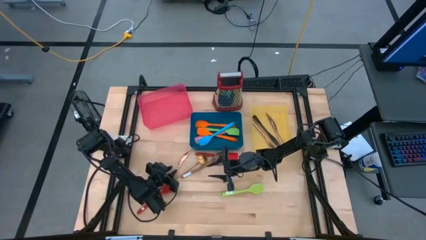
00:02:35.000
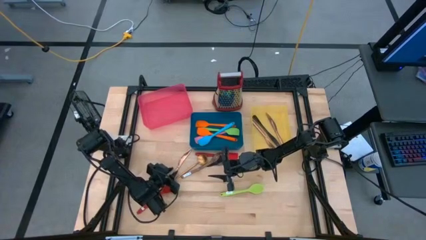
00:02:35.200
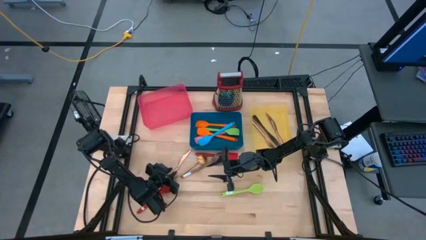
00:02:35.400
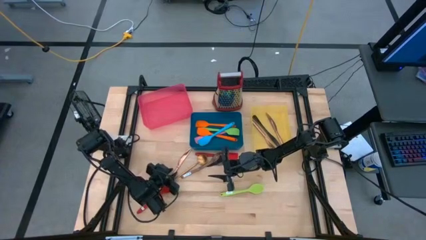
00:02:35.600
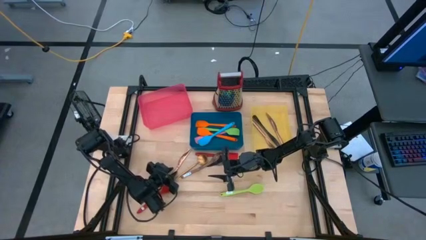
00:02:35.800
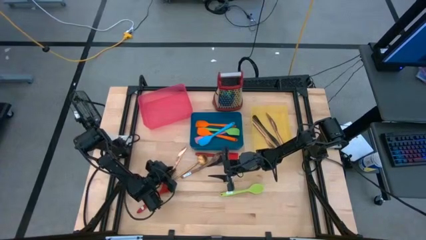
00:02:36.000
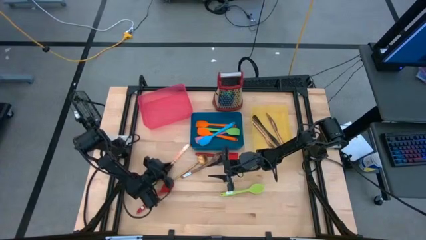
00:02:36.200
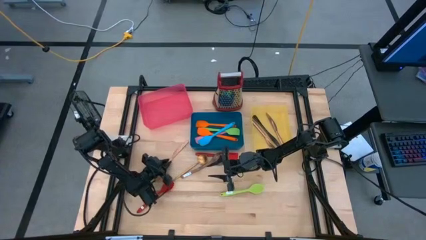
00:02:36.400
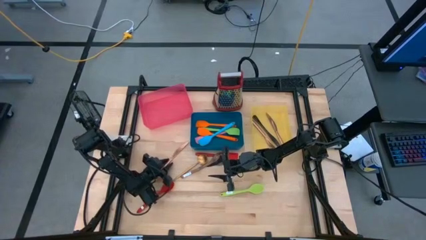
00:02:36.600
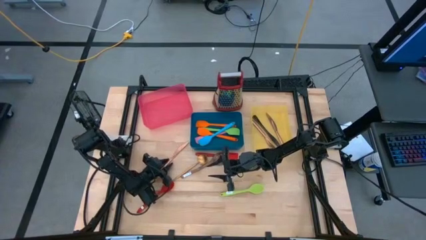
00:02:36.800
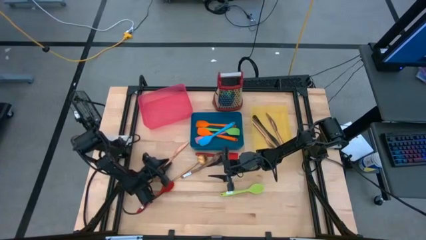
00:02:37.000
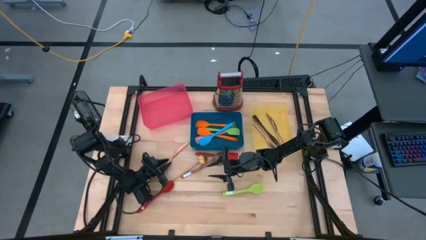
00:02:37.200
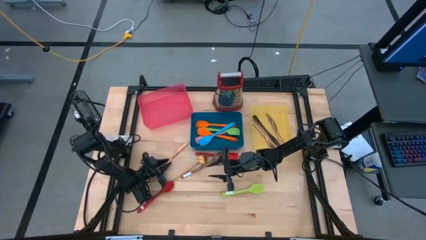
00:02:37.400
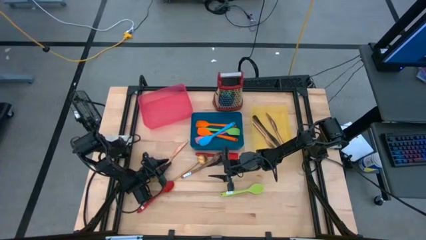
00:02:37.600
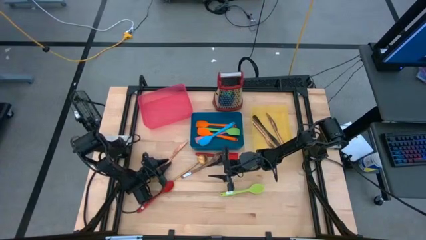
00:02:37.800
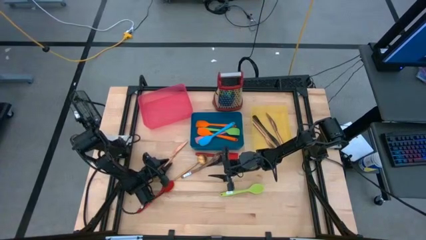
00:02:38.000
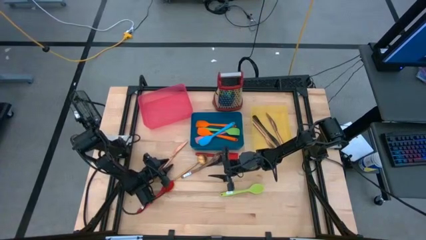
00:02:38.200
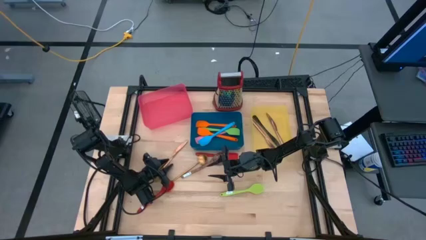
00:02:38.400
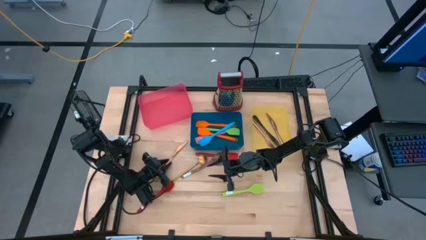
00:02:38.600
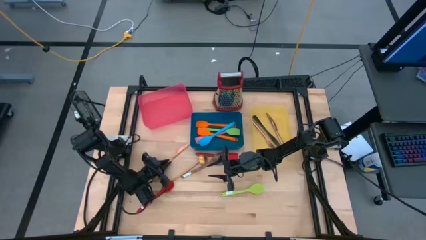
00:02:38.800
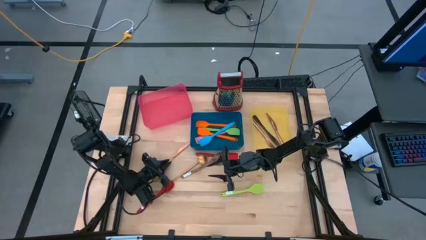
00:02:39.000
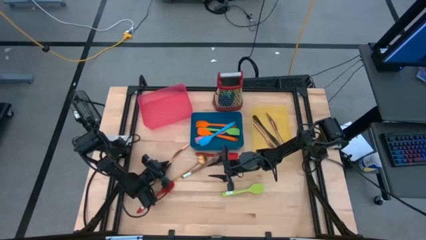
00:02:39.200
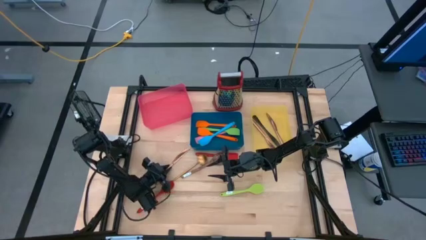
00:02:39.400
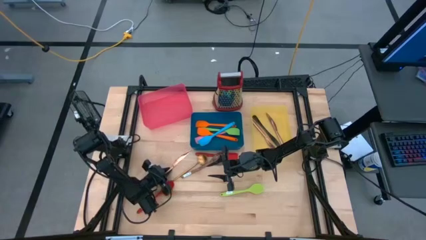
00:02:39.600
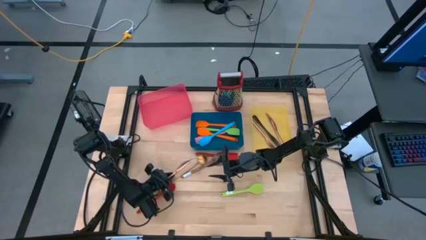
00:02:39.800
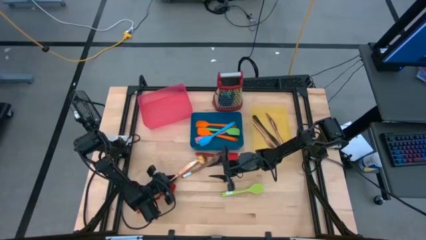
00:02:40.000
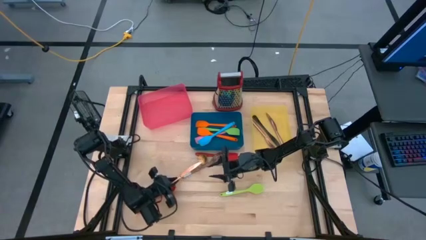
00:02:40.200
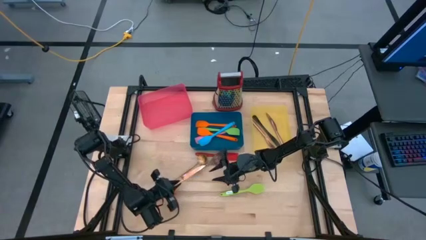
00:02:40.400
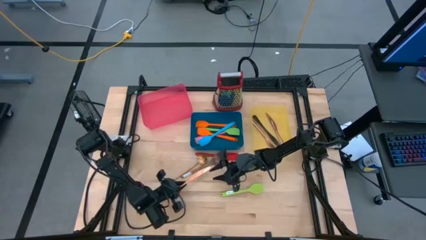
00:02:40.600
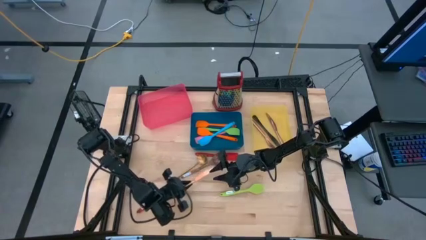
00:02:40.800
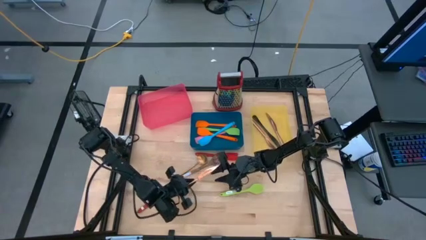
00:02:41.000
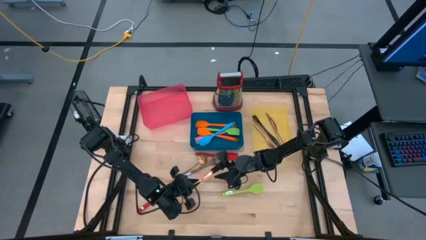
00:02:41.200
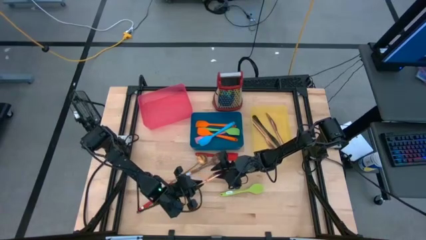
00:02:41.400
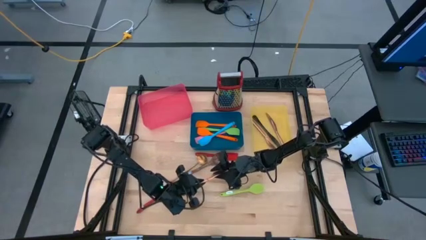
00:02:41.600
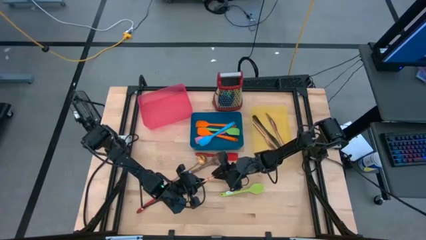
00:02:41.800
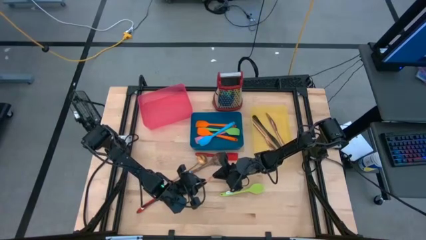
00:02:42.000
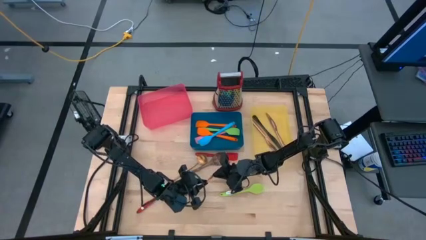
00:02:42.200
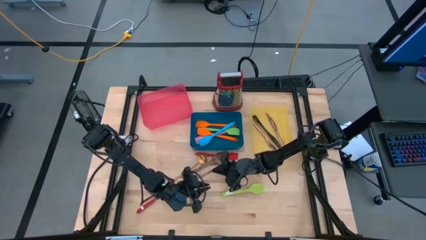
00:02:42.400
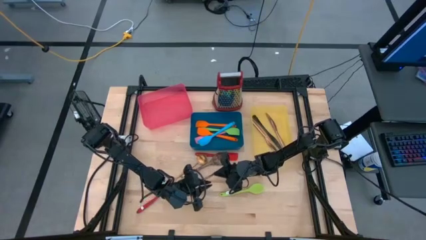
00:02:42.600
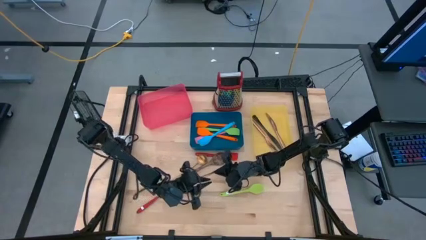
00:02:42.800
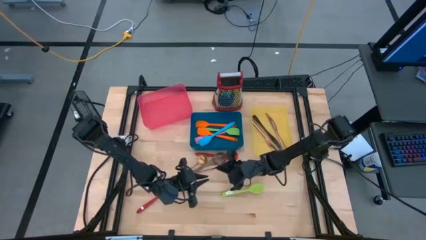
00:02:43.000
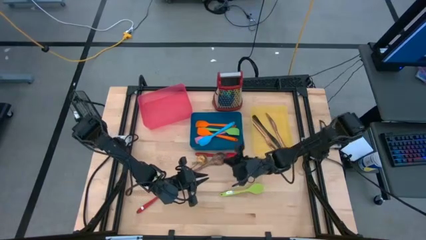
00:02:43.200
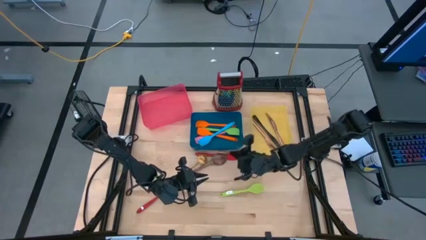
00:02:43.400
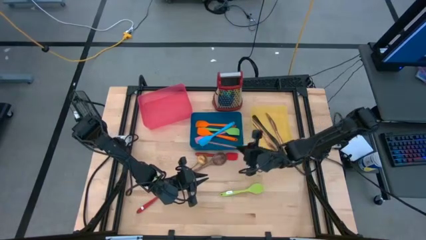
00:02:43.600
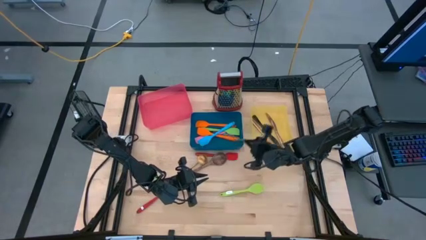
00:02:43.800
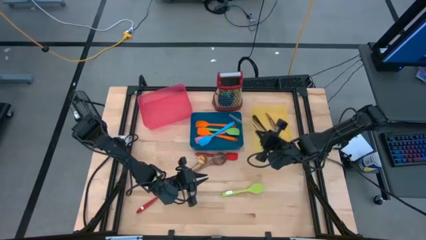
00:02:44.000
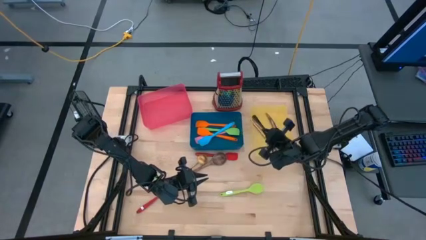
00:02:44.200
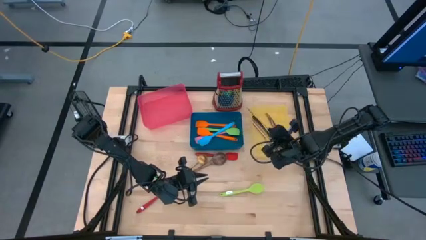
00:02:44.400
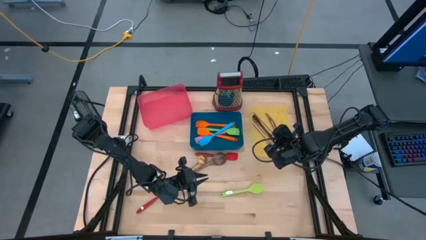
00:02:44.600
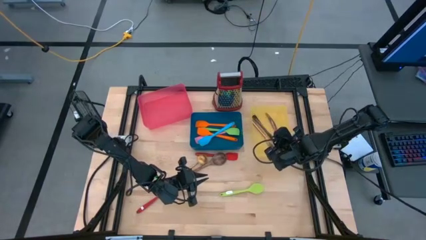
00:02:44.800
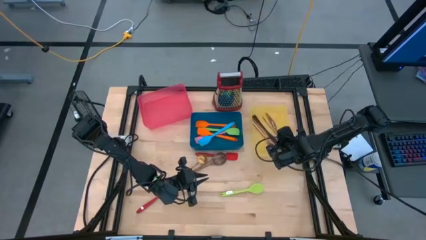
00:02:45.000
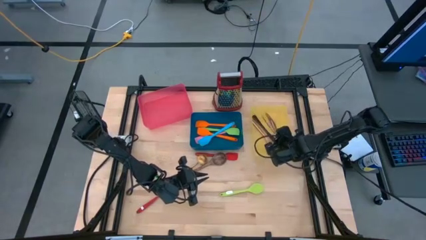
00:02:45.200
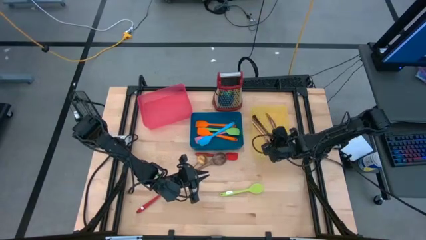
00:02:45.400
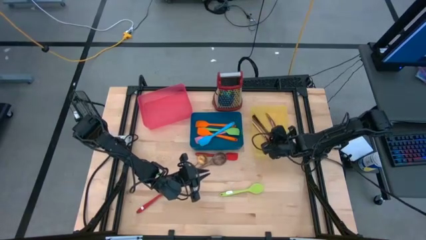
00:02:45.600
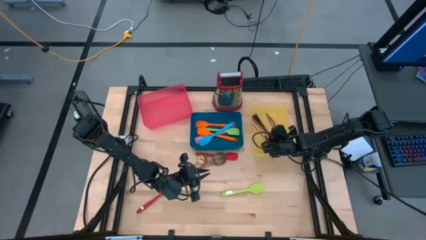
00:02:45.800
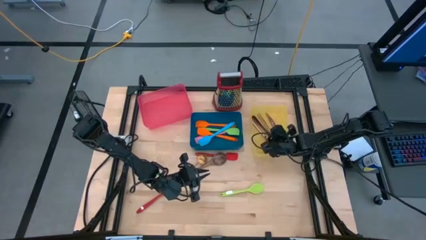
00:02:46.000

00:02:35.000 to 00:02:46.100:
Task: Pick & Place Kitchen Items
Put the gold table knife into the yellow bin

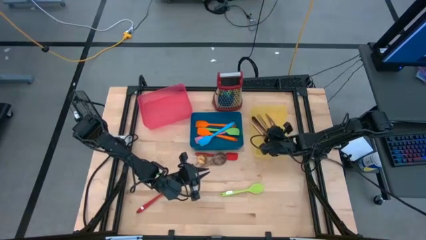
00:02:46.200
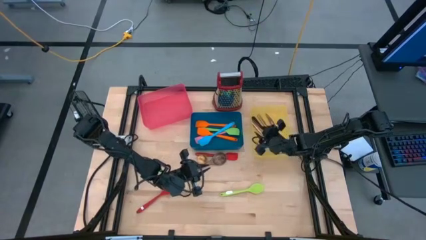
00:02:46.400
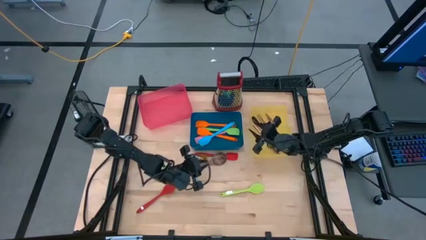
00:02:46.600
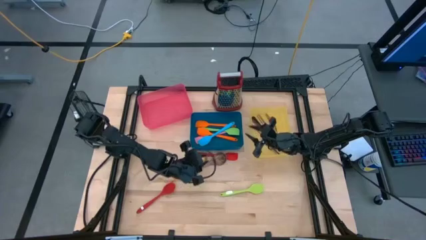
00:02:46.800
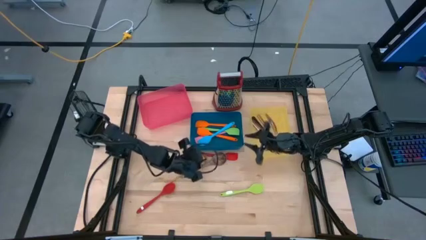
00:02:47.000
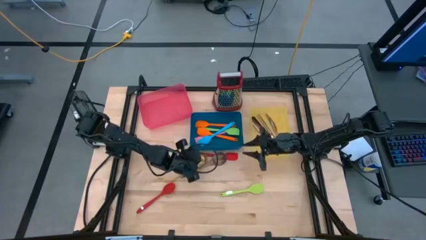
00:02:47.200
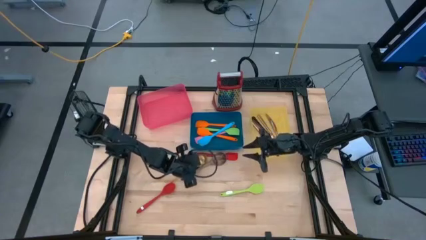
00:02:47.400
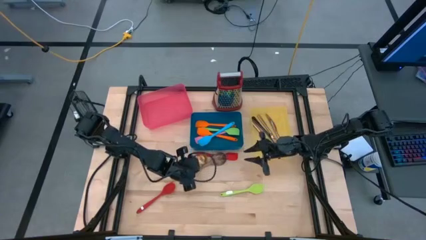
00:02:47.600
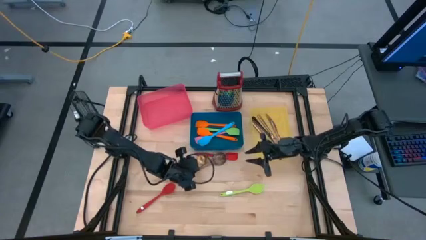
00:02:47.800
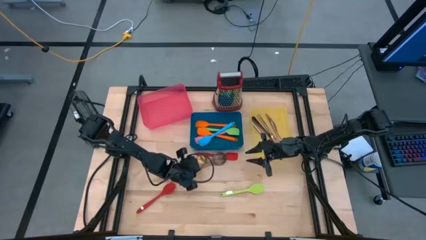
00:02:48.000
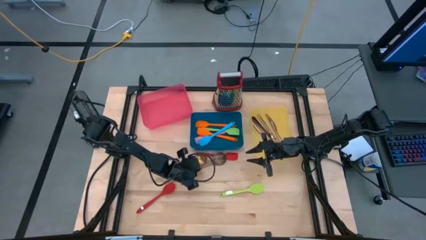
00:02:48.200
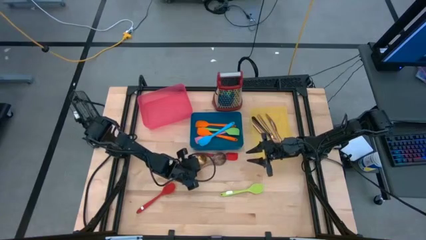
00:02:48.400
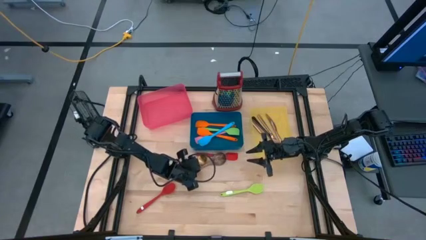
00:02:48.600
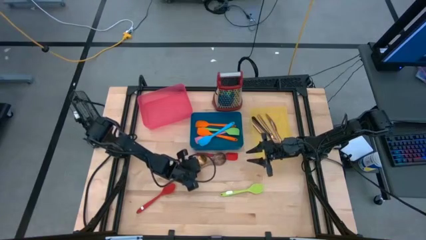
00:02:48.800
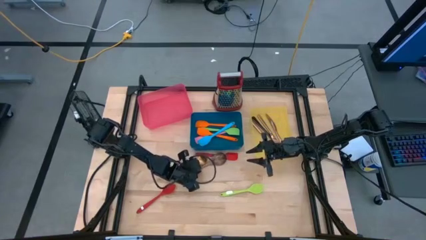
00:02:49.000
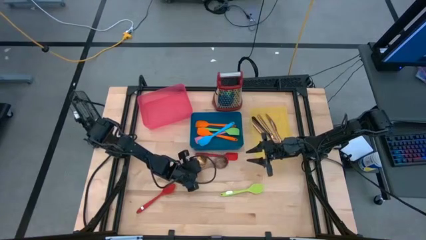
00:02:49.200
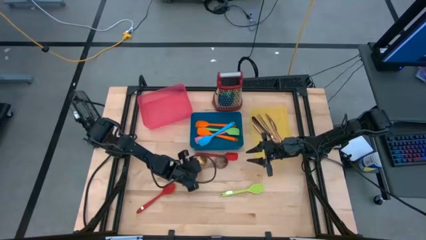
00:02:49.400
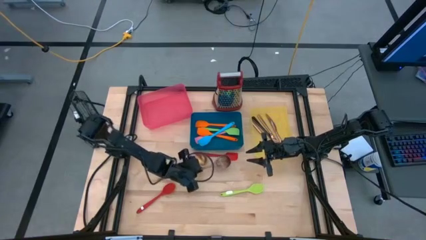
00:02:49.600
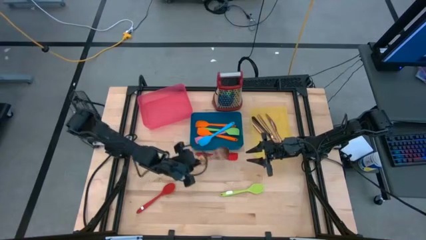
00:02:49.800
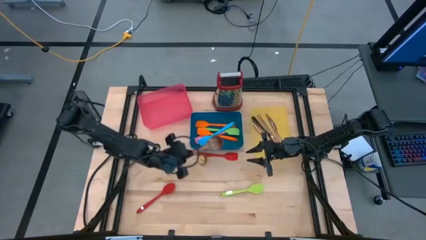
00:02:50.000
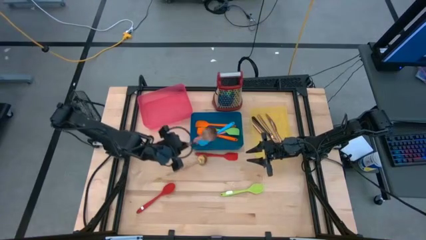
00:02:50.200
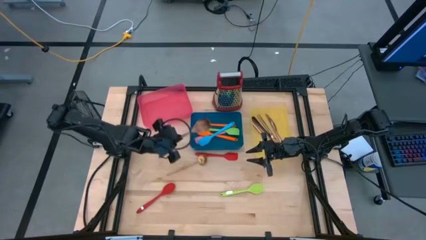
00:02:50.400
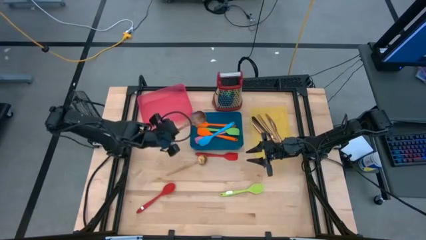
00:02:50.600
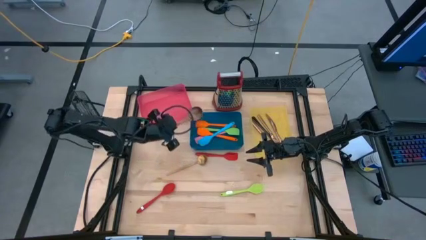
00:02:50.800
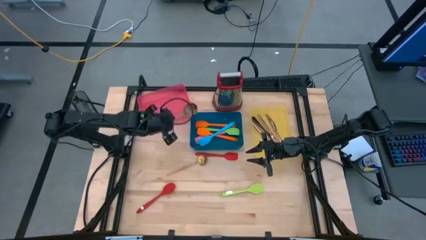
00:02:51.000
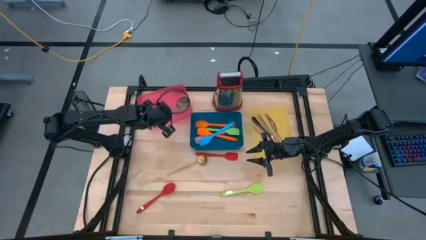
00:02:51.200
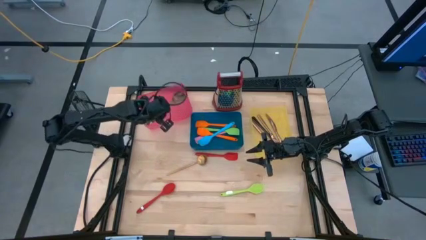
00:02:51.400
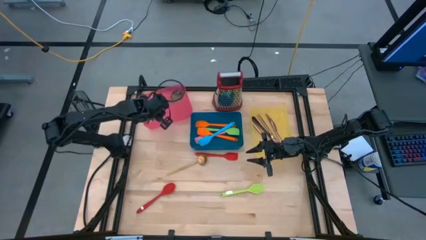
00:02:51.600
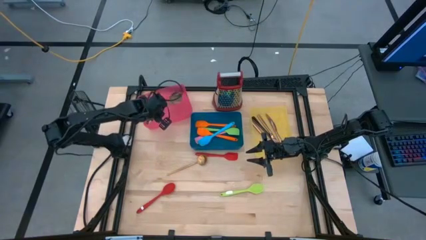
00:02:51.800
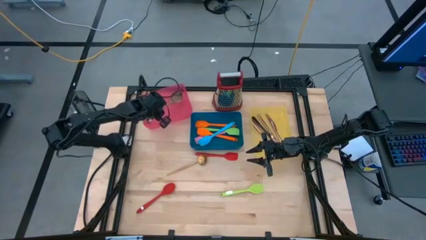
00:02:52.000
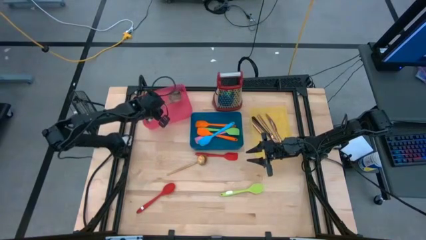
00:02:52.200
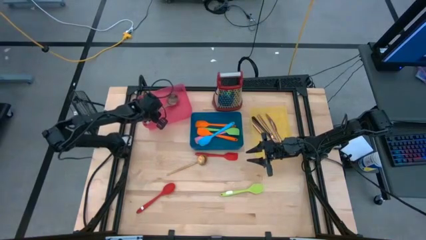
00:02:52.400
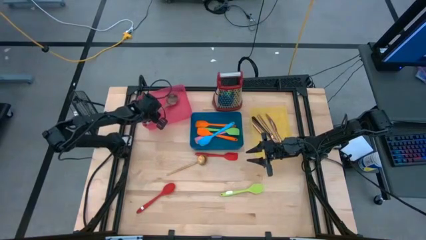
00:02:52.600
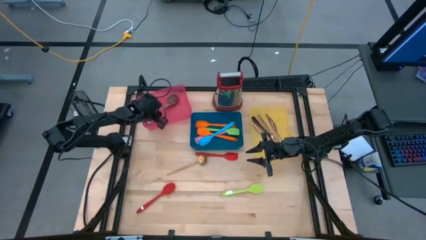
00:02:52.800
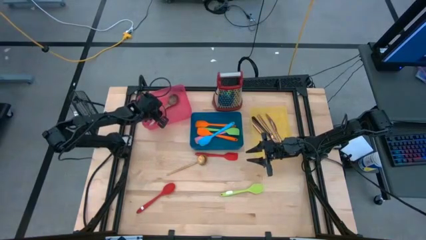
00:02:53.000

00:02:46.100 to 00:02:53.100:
Put the brown serving spoon into the pink bin
